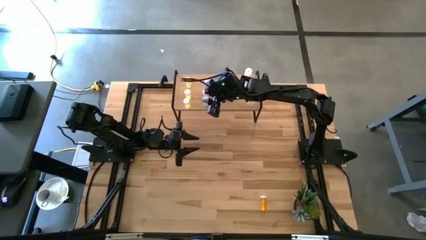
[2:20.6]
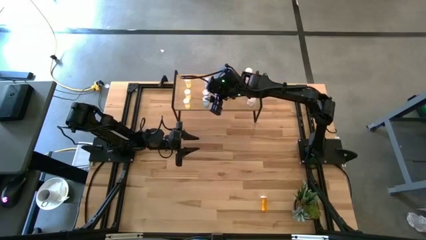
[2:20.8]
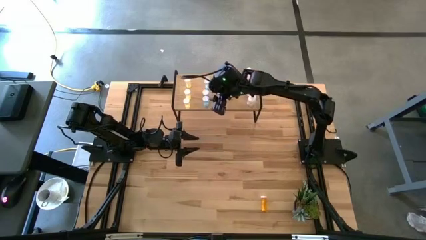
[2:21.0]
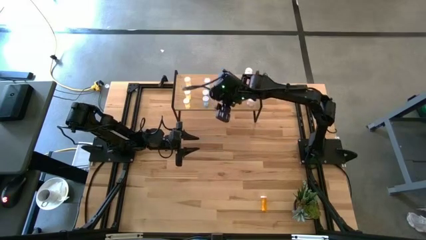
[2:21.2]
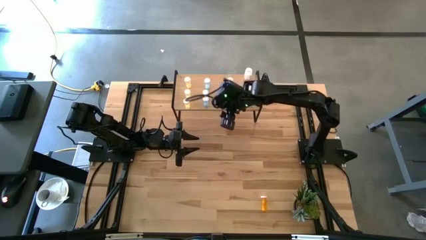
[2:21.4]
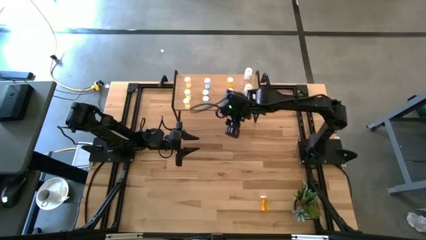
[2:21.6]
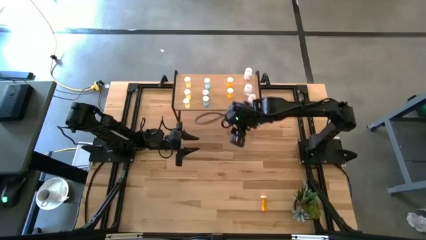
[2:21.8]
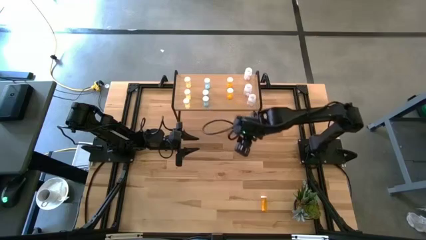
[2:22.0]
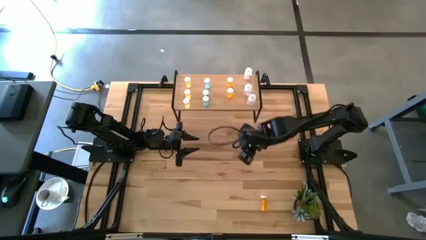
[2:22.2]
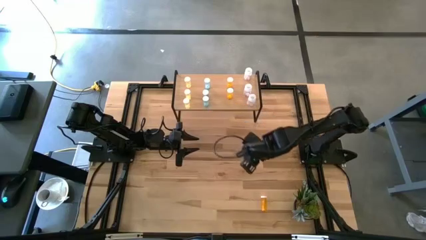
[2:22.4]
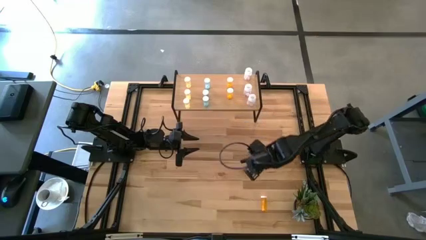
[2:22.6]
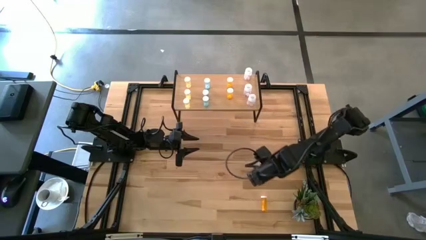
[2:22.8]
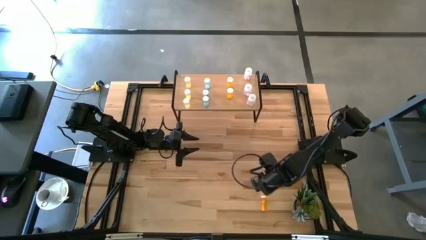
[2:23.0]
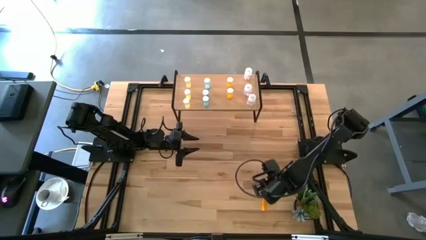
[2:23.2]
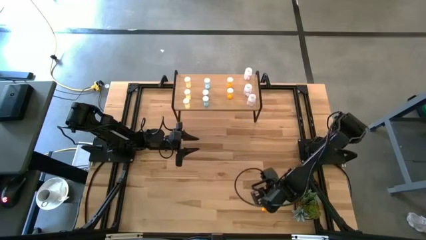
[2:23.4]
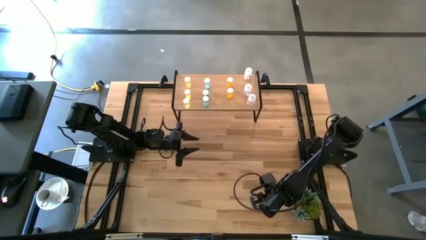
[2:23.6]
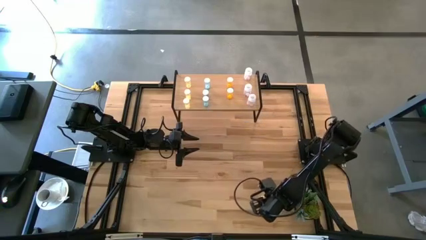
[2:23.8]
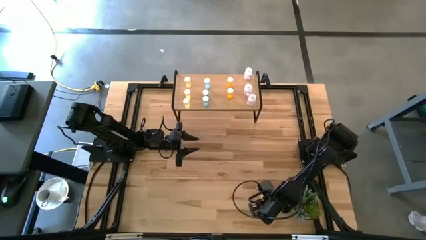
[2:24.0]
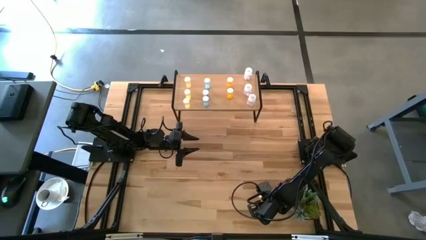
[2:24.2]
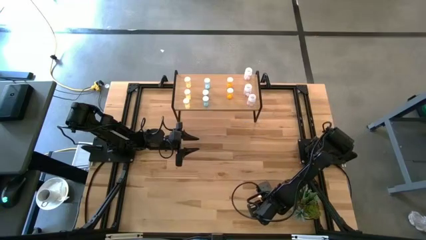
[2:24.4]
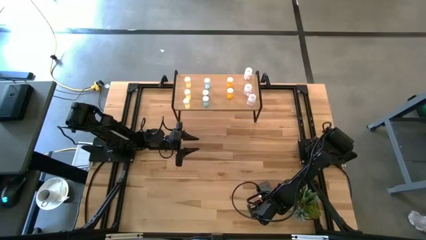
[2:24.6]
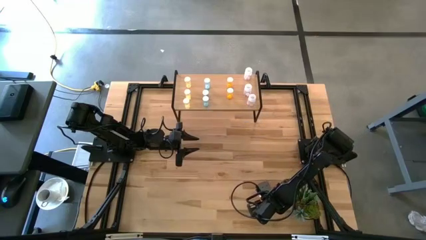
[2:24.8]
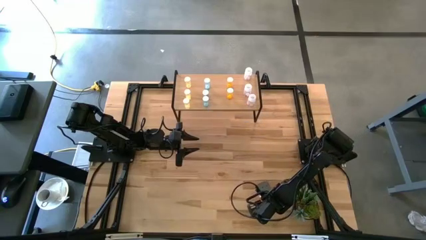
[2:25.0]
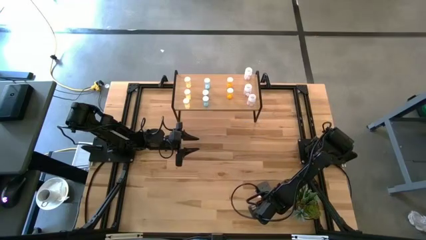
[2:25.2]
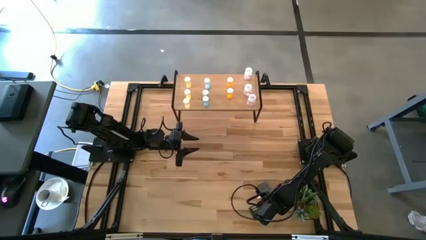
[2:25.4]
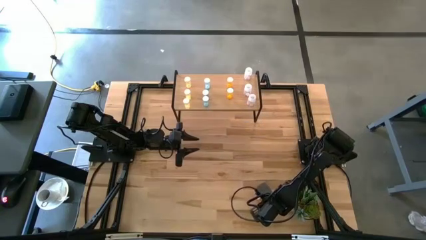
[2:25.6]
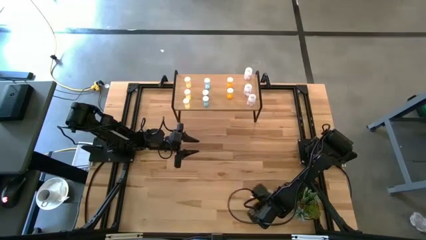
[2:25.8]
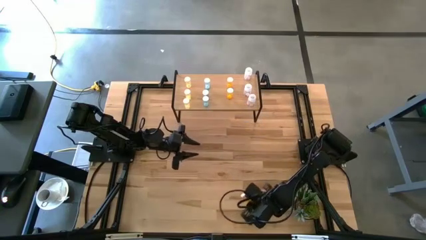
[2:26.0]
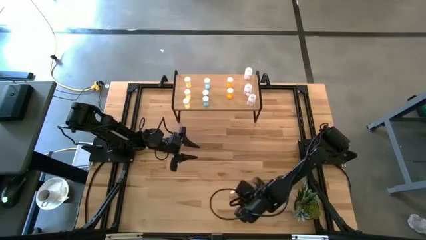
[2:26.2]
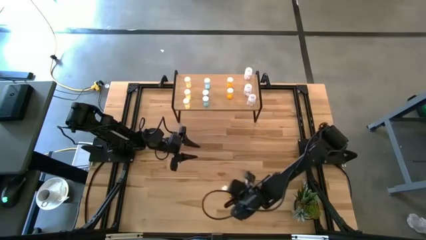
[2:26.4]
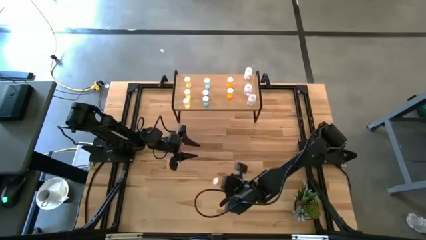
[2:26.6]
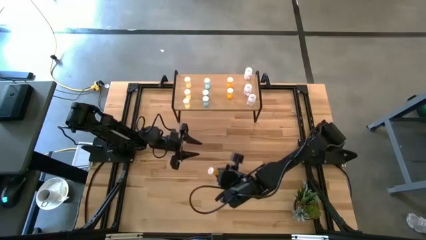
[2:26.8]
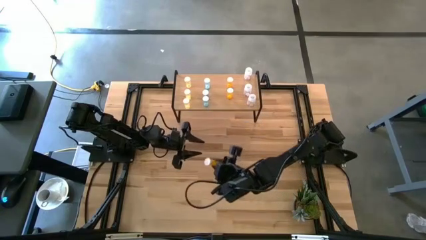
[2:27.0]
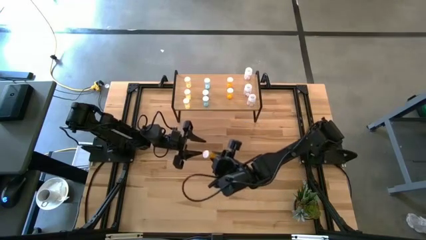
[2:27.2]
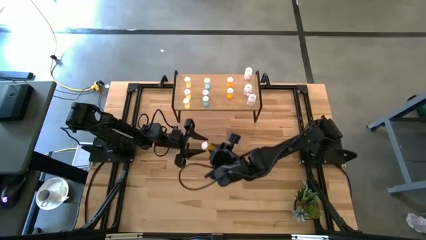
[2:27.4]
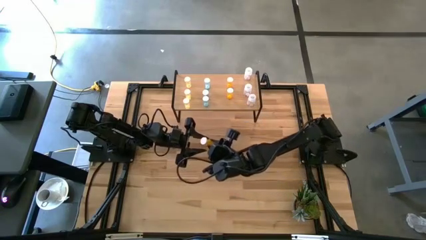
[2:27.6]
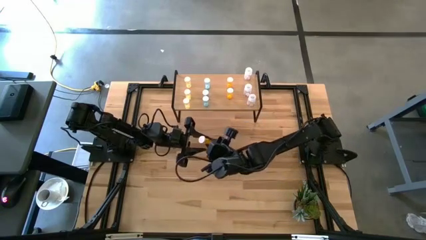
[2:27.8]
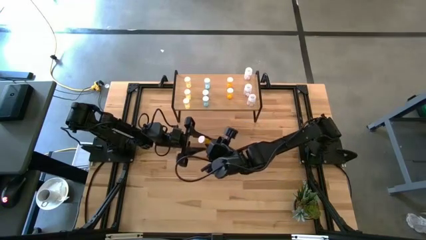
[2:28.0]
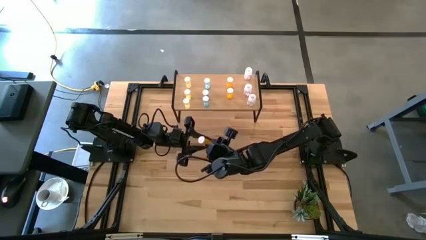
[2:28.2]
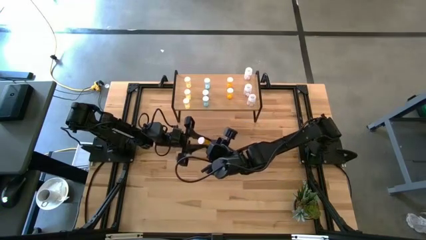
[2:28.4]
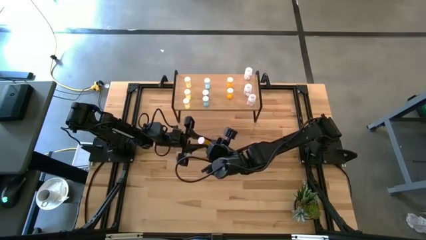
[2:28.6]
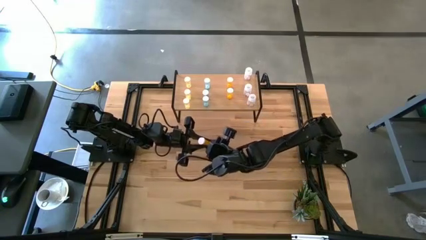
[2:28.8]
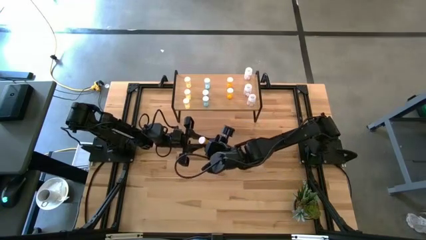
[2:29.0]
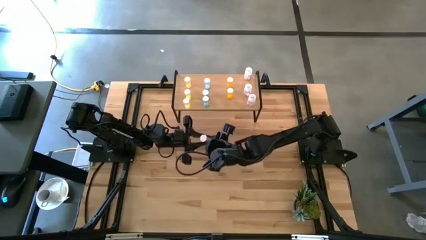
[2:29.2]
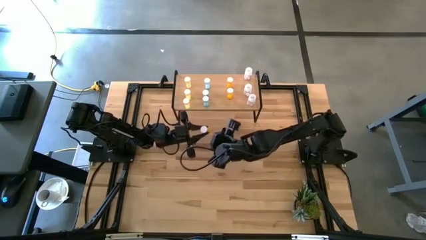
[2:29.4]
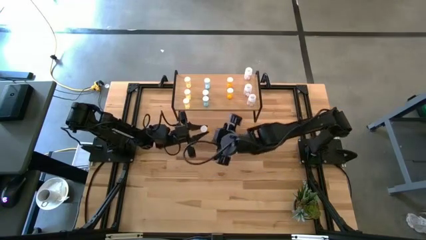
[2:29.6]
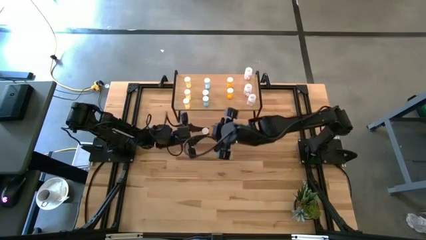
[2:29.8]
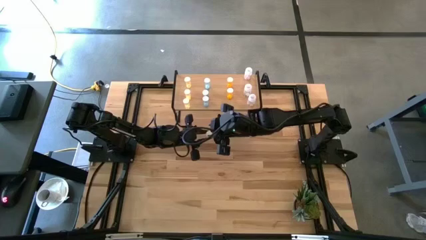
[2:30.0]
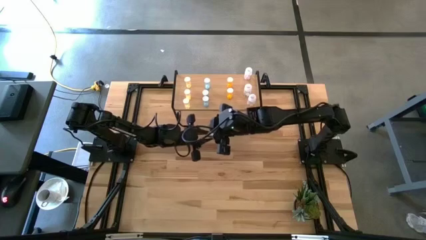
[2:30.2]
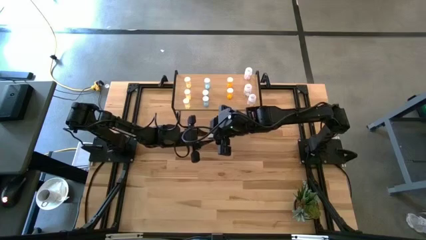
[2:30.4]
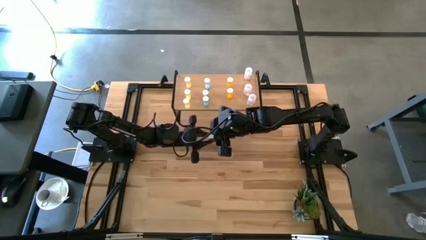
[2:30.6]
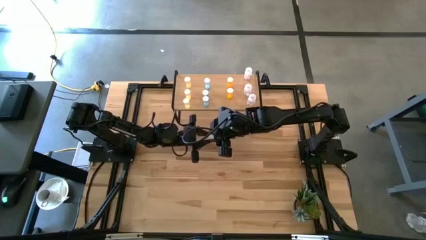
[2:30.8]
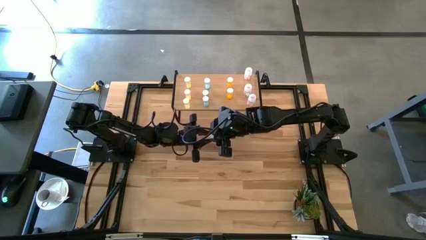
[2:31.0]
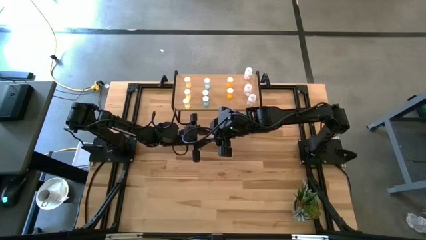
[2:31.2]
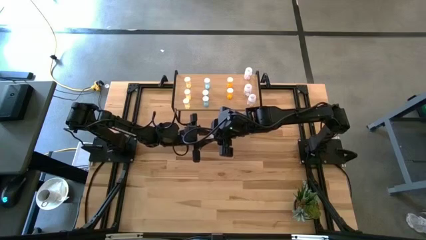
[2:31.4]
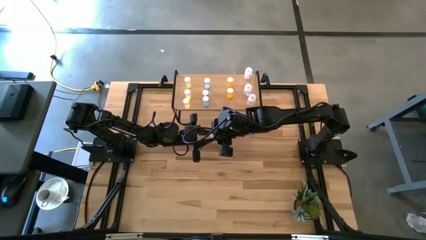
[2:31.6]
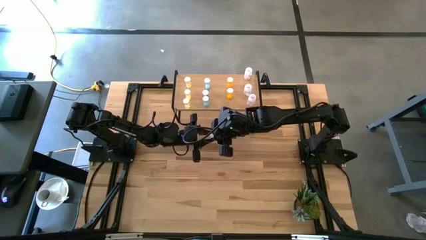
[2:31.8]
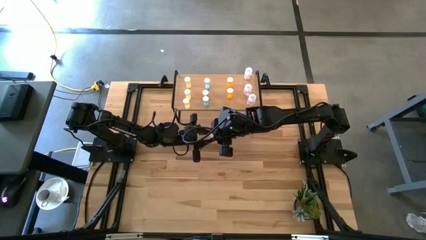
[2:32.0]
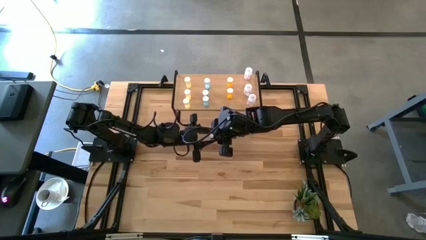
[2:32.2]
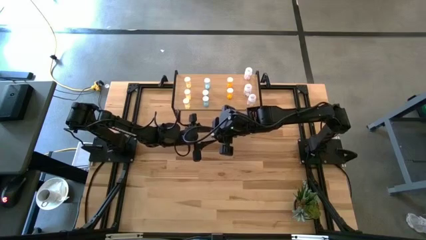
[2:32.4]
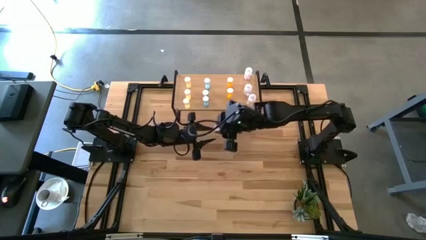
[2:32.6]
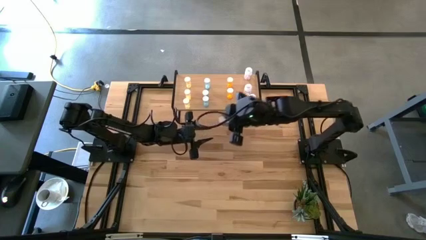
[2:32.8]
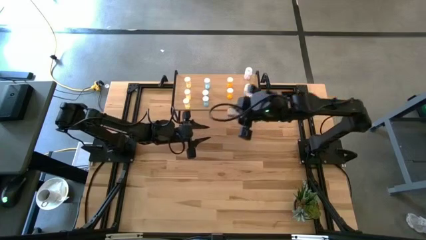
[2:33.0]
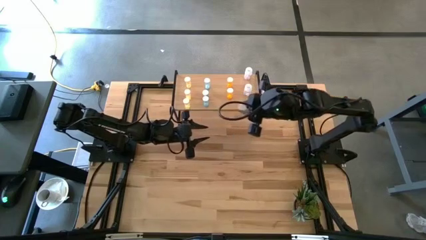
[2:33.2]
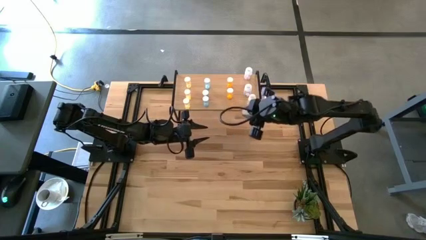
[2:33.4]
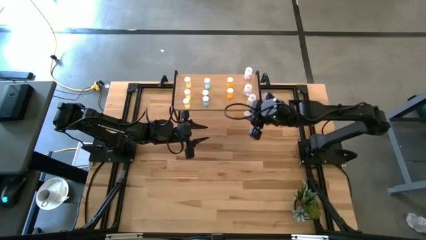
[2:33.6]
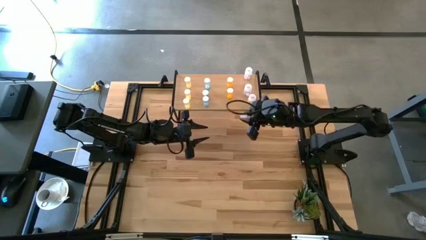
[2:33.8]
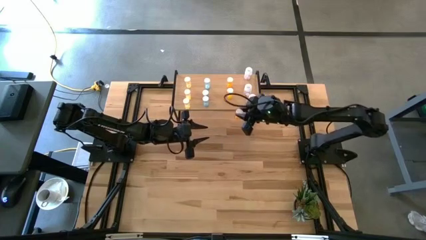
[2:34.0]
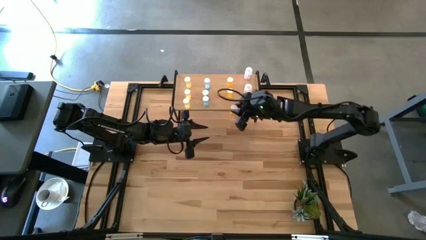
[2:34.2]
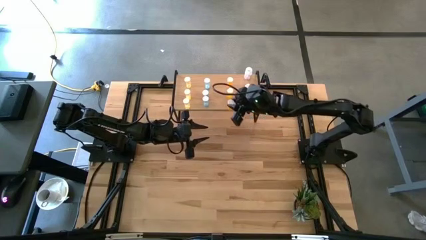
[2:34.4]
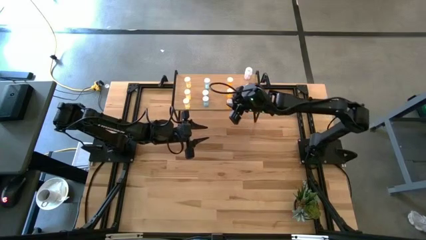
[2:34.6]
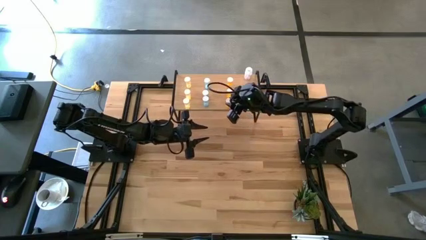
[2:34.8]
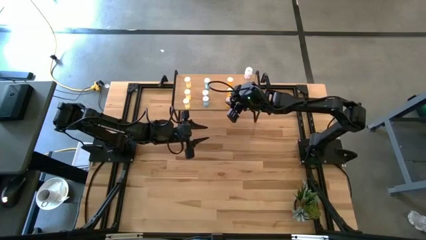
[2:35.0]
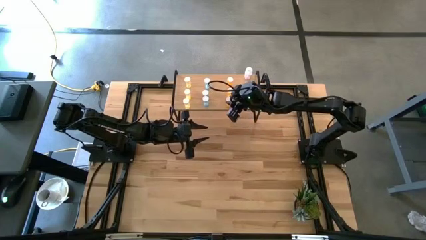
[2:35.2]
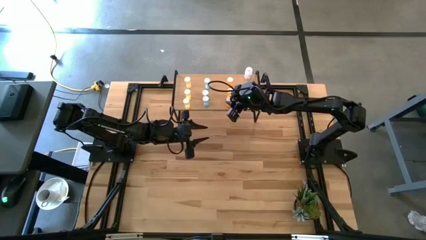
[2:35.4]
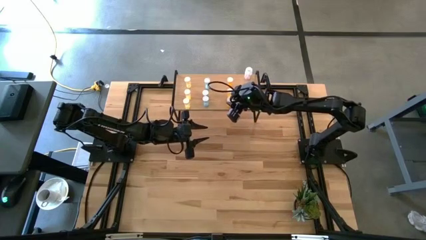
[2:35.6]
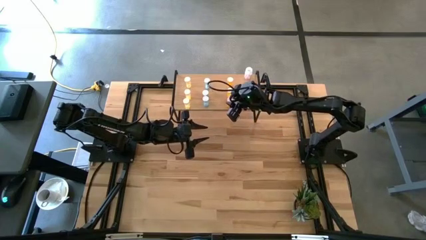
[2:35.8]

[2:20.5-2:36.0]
Task: Pick and place medicine bottles onto shelf by color
Put the orange pill bottle on the shelf aligned with the other orange pill bottles

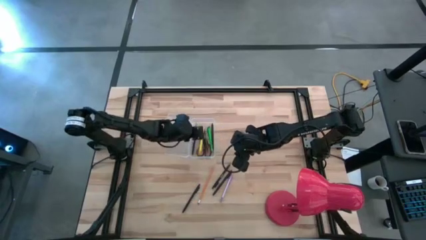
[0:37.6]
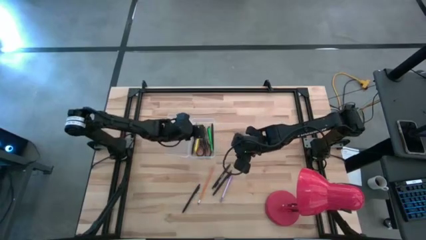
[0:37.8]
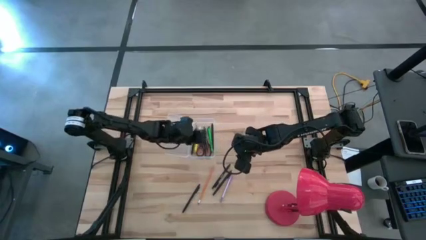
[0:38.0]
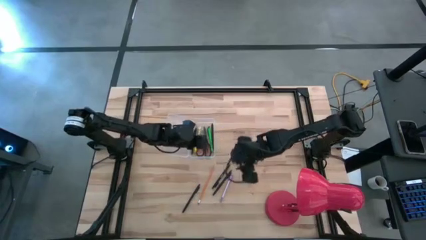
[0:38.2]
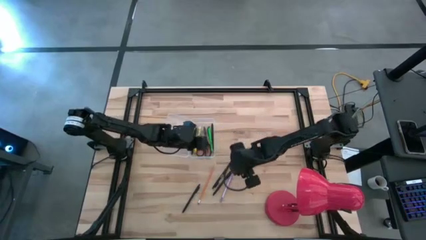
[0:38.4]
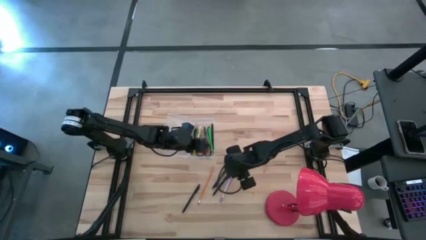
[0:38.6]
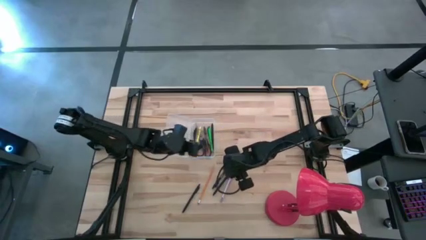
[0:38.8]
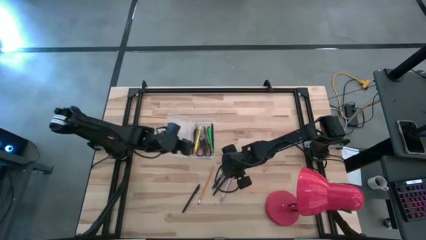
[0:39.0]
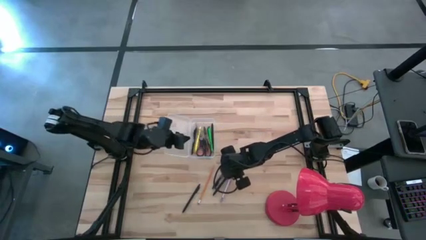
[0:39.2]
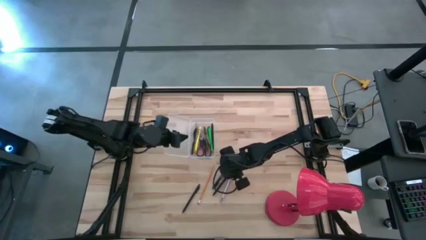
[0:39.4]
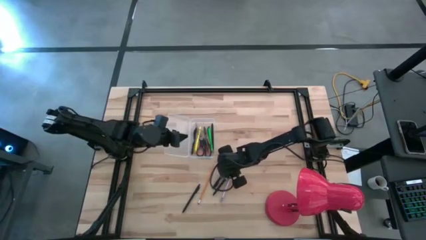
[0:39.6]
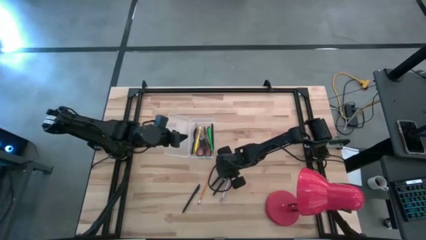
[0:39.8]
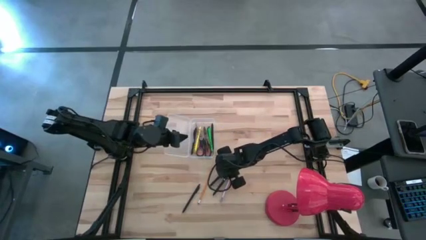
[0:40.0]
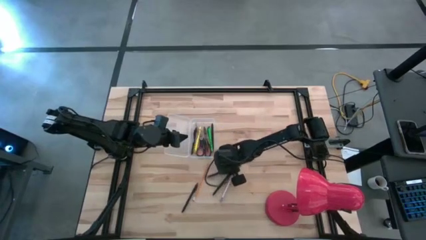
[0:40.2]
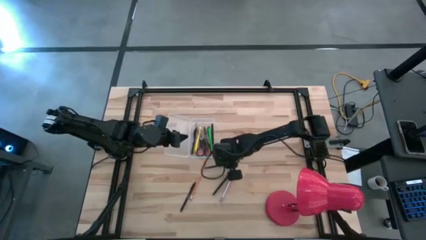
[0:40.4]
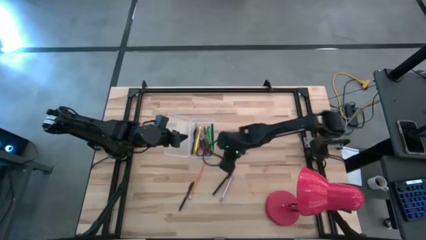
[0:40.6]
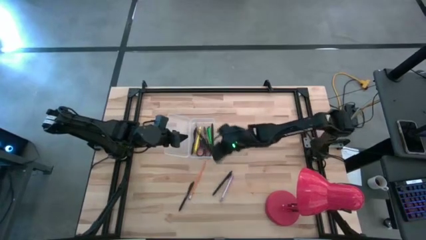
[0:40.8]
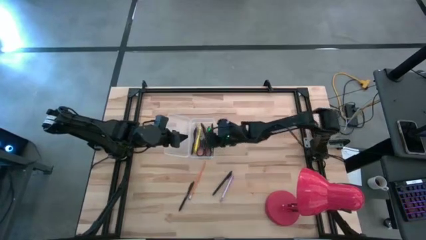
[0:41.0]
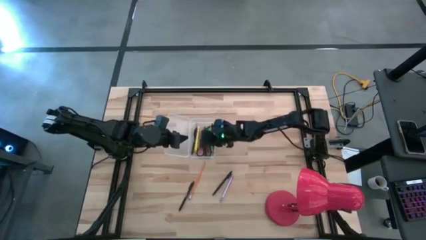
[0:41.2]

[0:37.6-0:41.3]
Task: Pick & place school supplies into a supply box
Put the black pen into the transparent supply box
